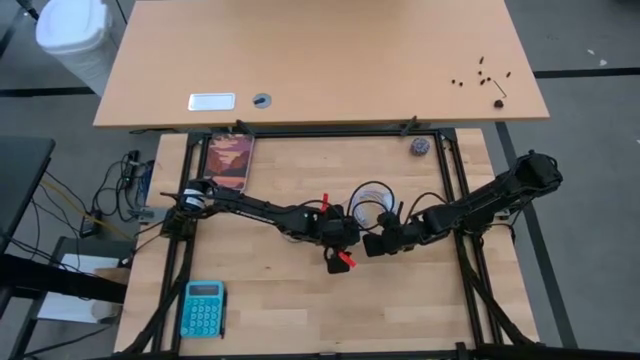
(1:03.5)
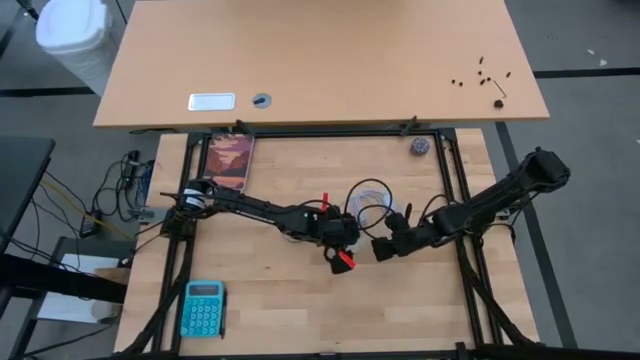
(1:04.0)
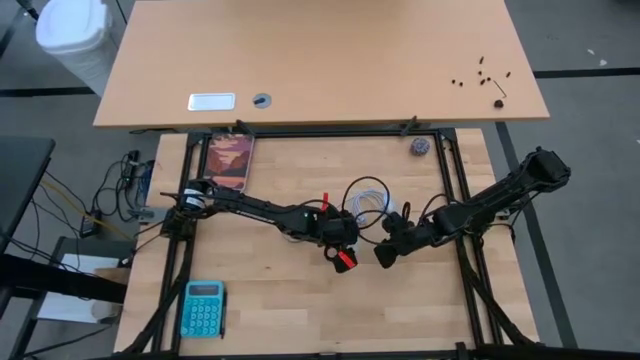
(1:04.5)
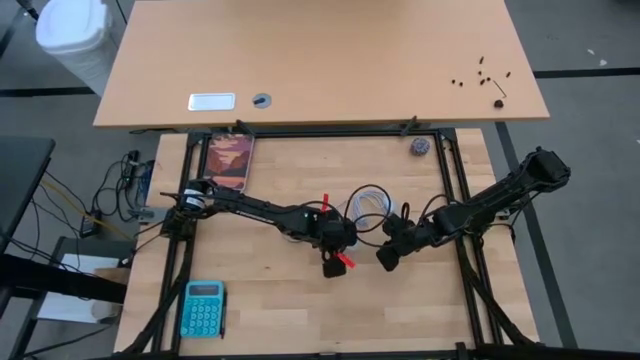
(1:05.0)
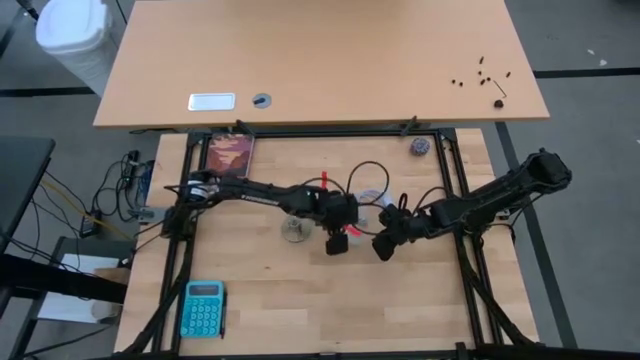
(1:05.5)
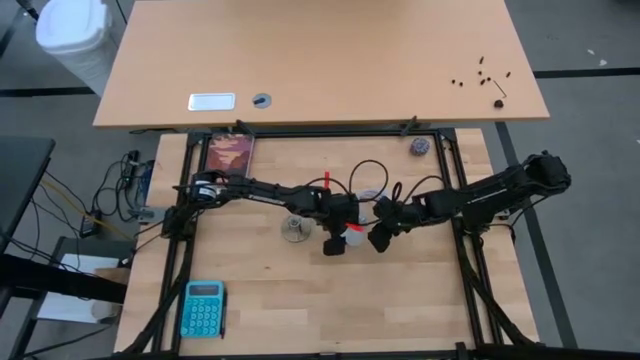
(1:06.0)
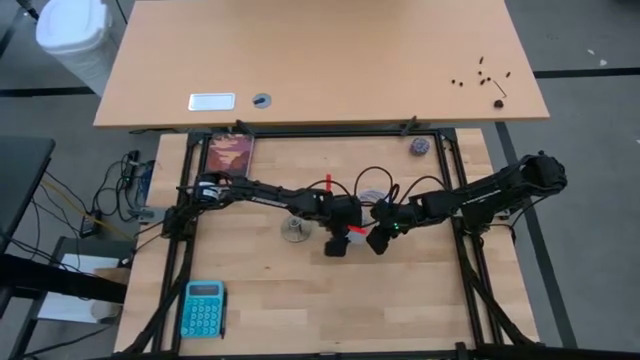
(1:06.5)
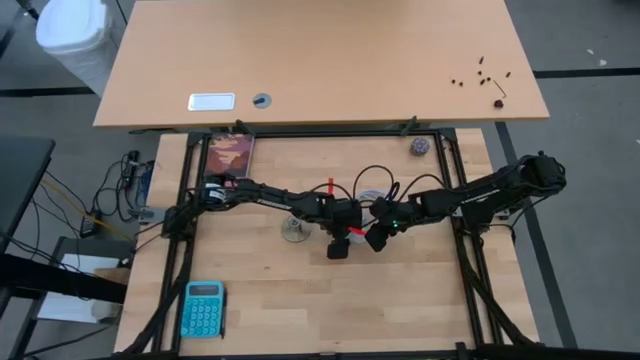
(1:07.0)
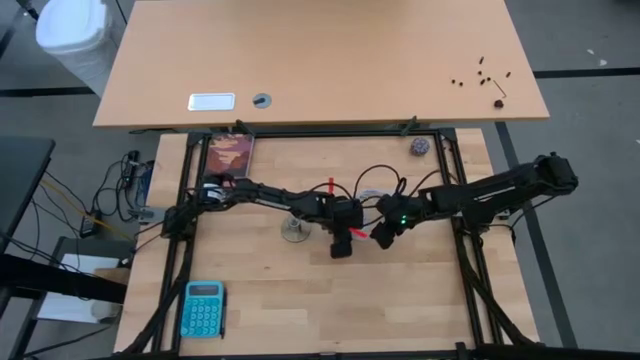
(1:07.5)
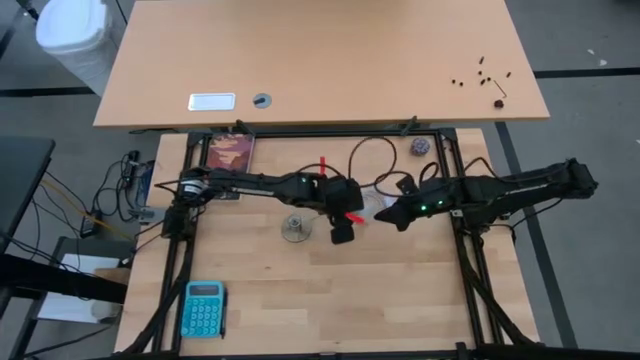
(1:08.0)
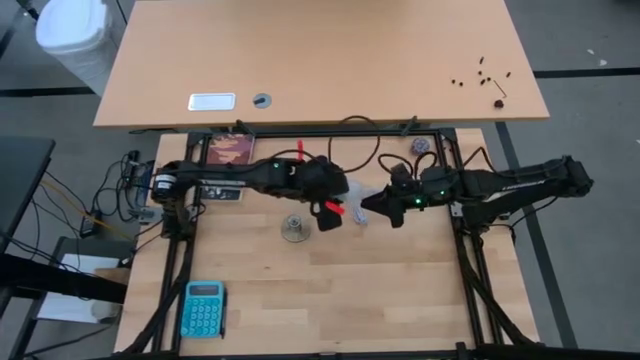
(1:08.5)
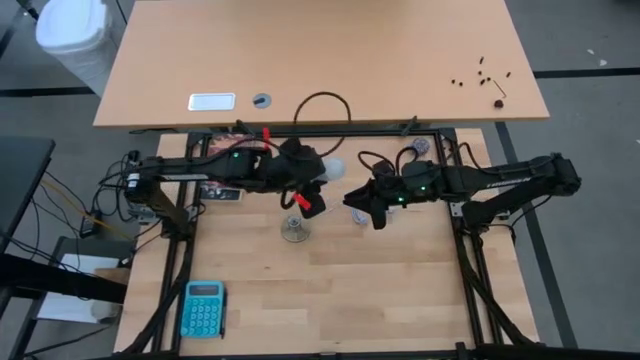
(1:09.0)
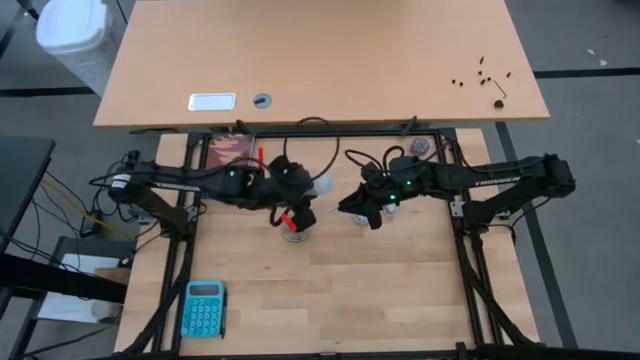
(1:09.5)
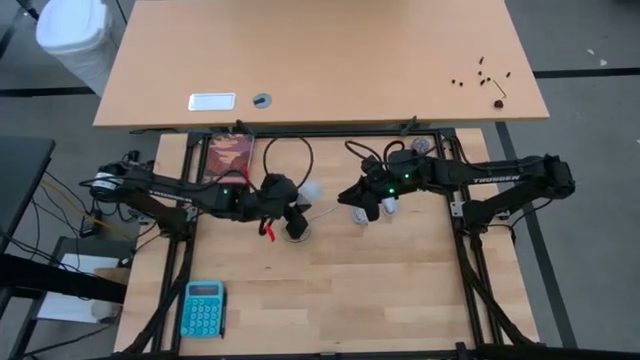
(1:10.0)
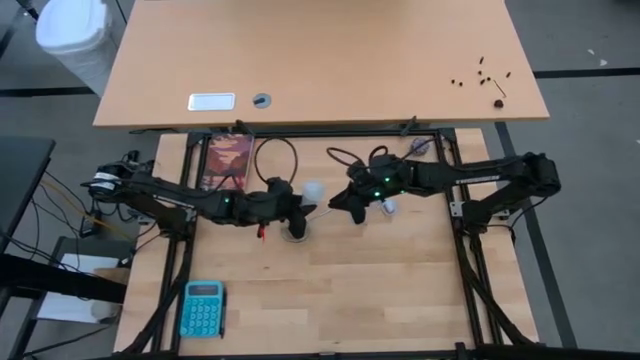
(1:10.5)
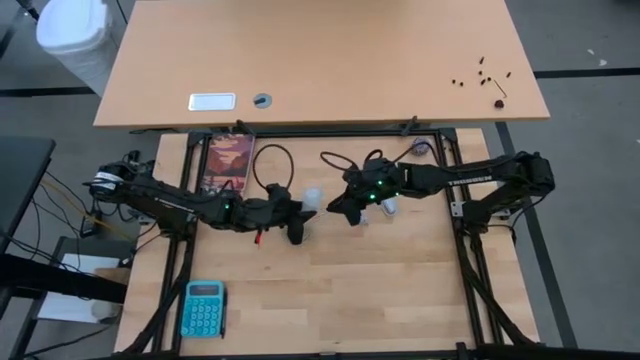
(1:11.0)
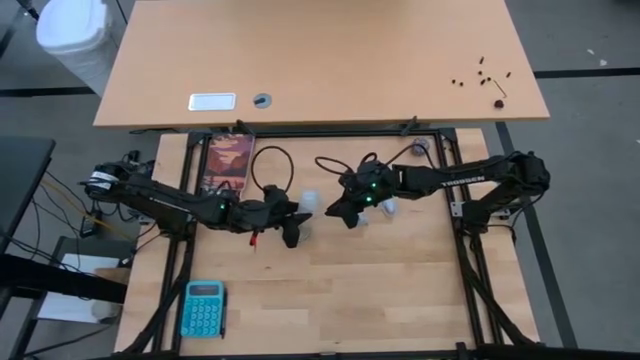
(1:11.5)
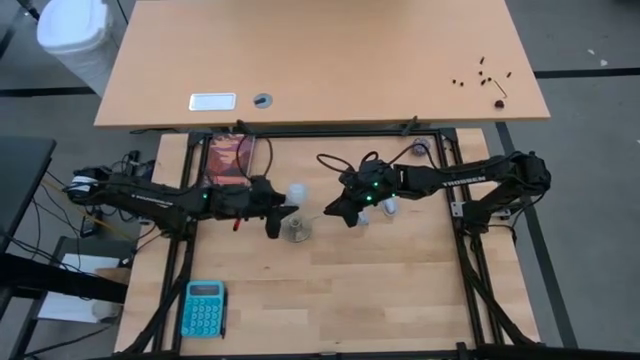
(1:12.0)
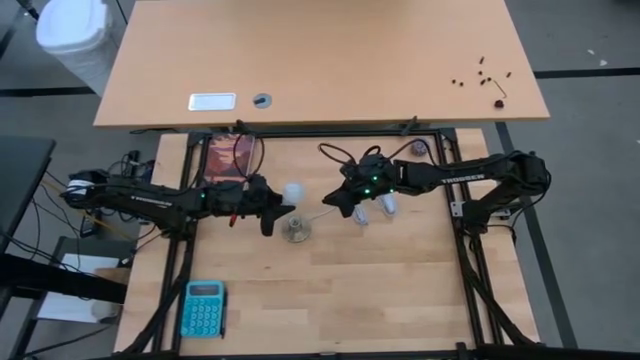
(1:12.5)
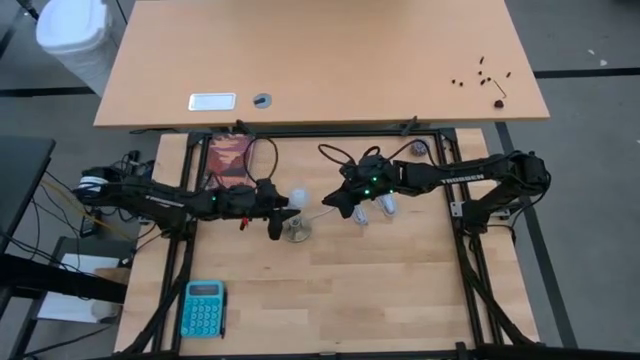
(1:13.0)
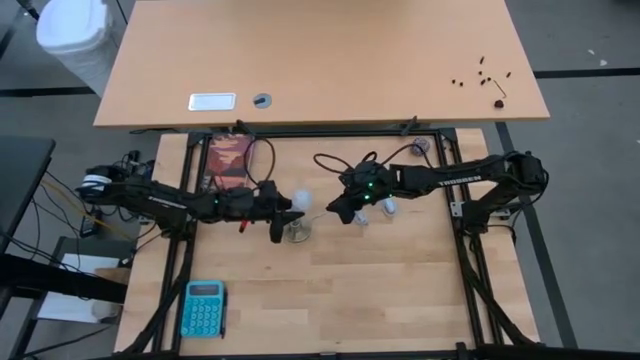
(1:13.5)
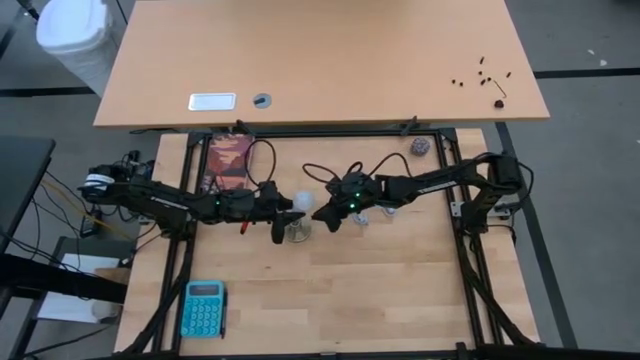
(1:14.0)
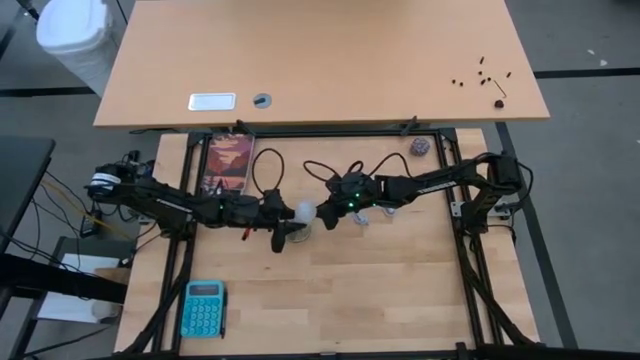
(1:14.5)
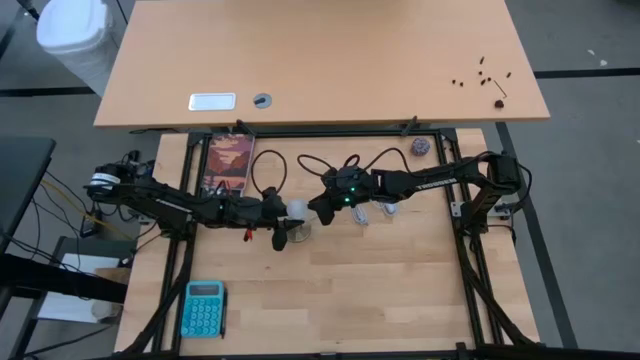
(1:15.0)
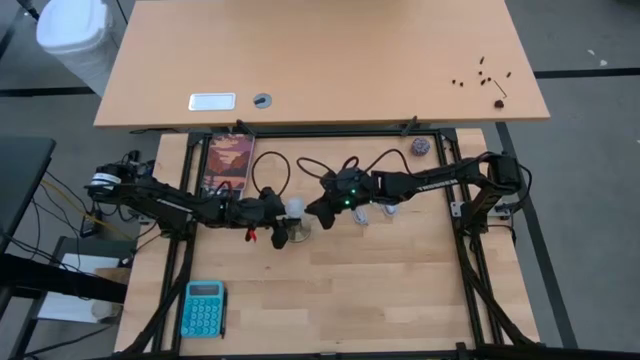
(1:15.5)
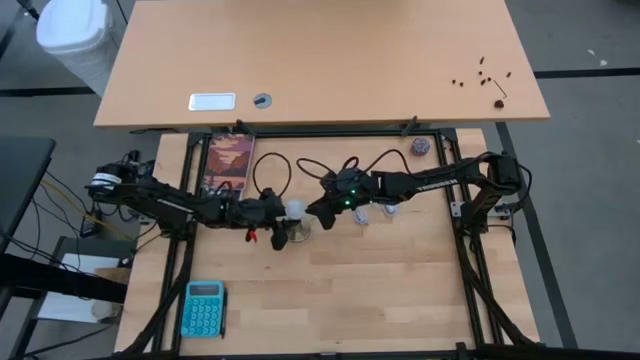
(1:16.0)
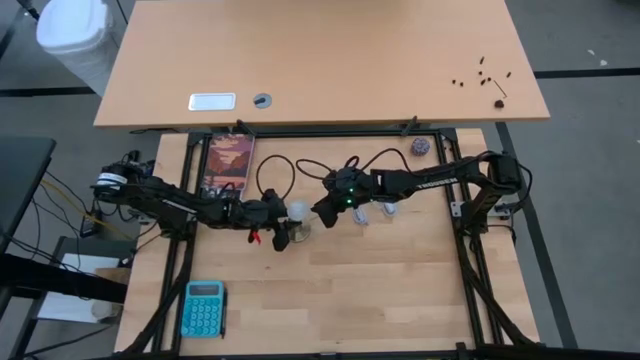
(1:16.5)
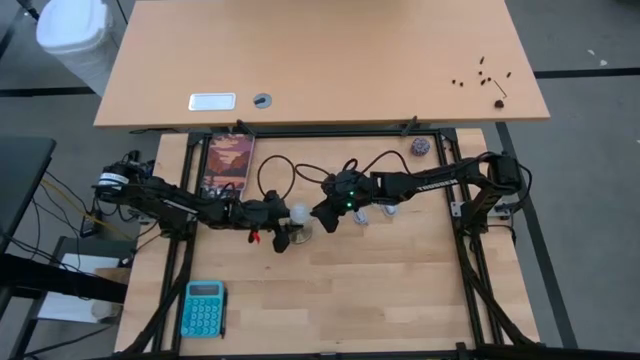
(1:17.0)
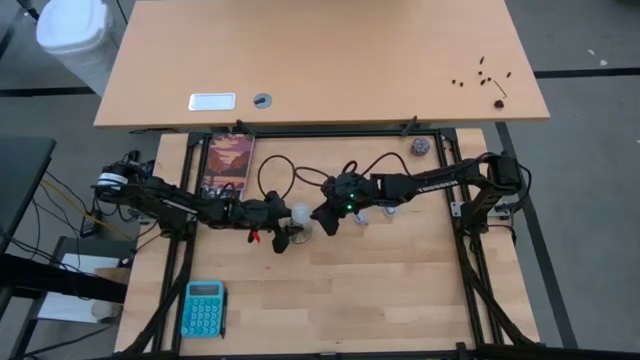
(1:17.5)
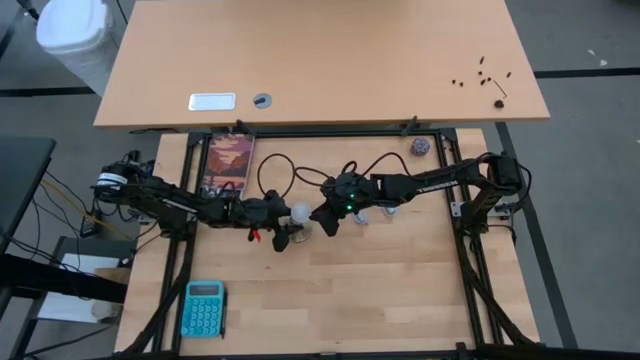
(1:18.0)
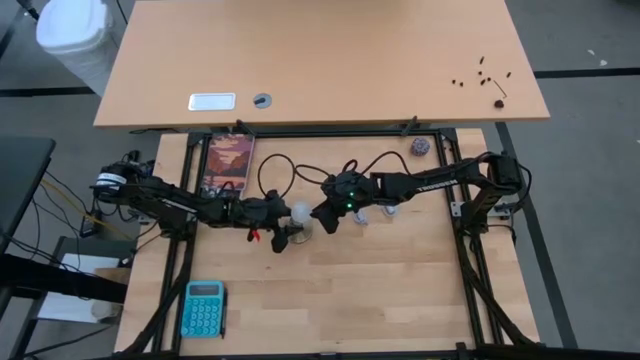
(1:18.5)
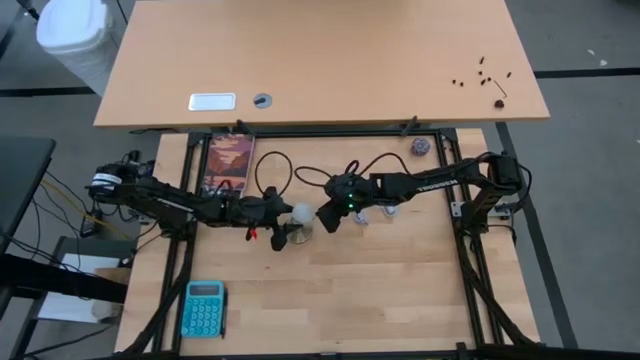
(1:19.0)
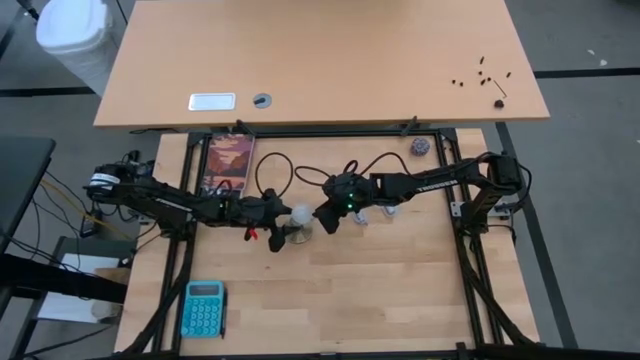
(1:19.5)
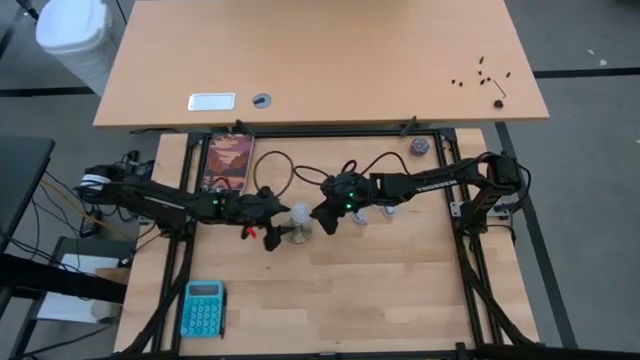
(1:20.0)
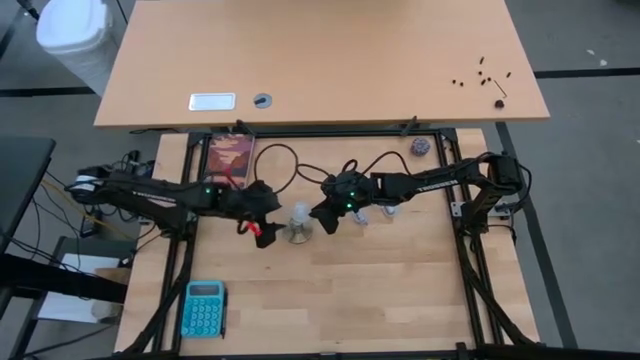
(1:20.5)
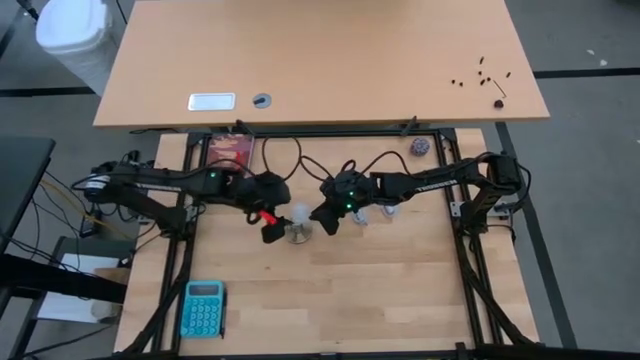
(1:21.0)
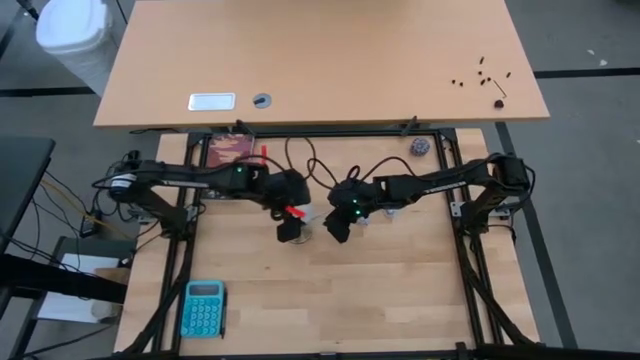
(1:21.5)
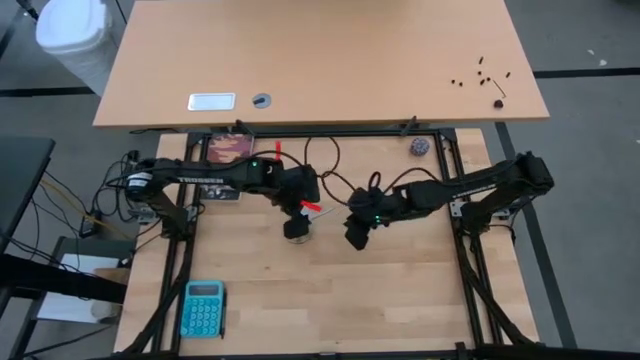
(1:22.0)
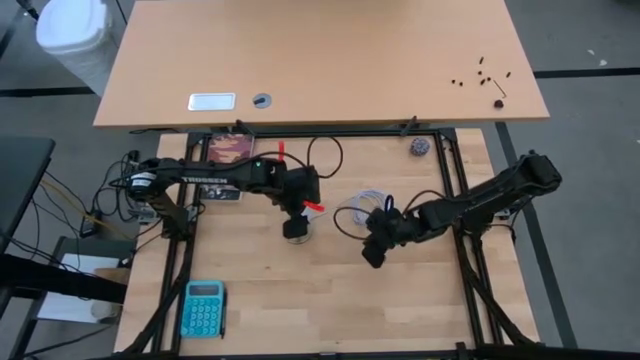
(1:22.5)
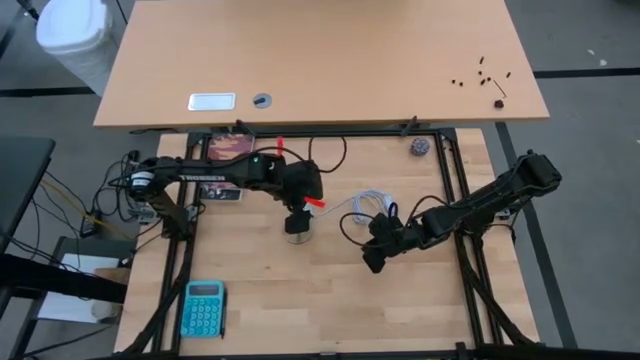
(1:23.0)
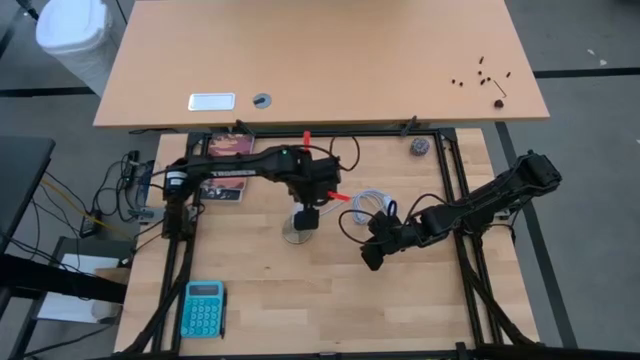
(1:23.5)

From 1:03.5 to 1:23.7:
Task: Screw lightbulb
Insert the lightbulb into the desk lamp

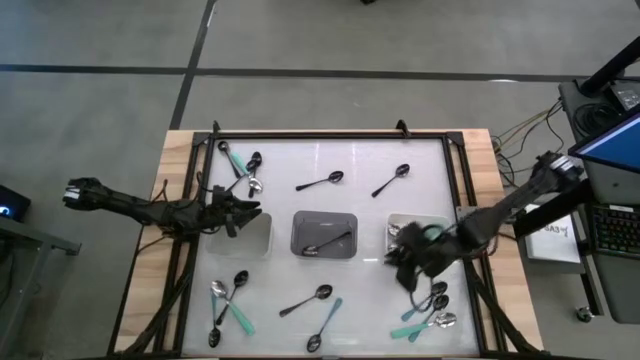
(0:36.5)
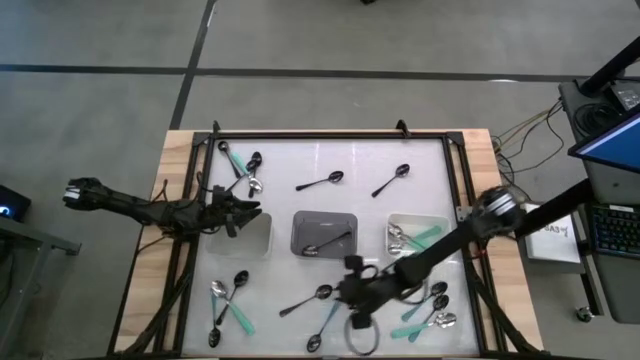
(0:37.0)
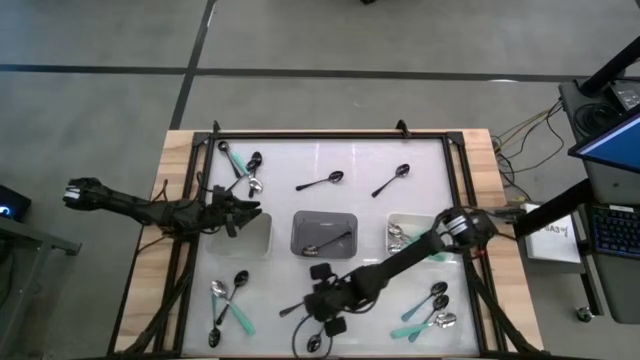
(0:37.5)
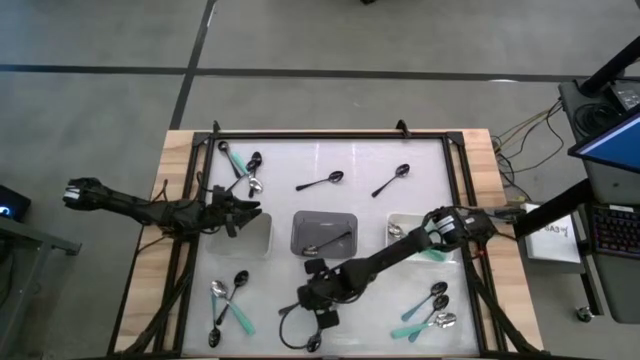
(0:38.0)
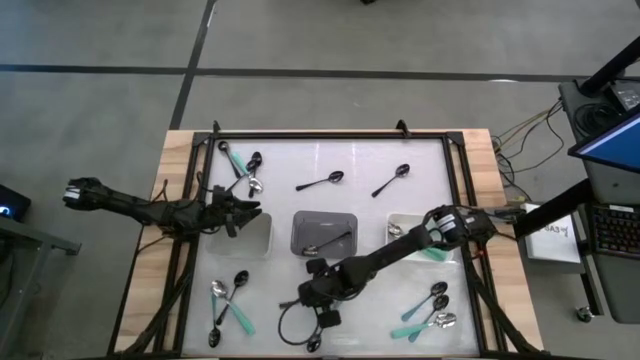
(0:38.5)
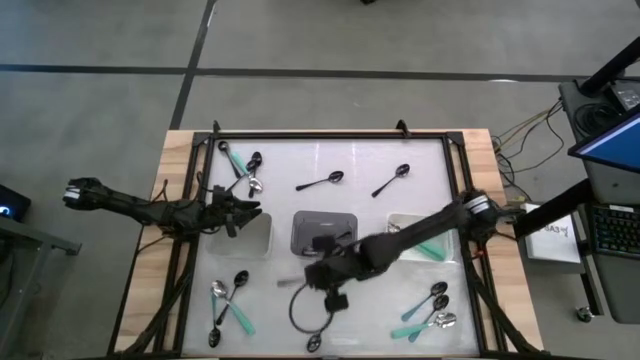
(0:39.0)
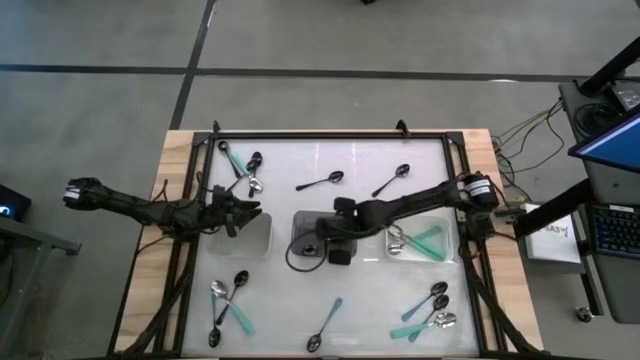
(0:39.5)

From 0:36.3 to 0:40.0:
Task: Sort silverware by color (type)
Put the black spoon into the black bin
